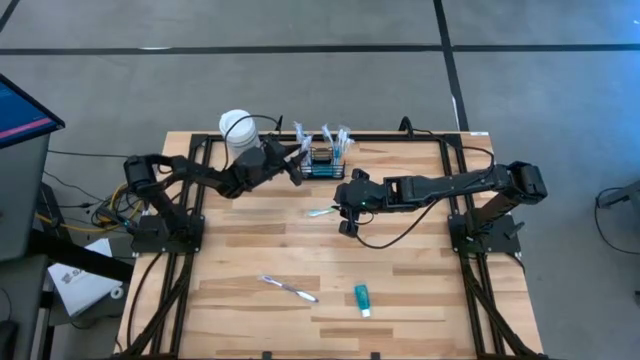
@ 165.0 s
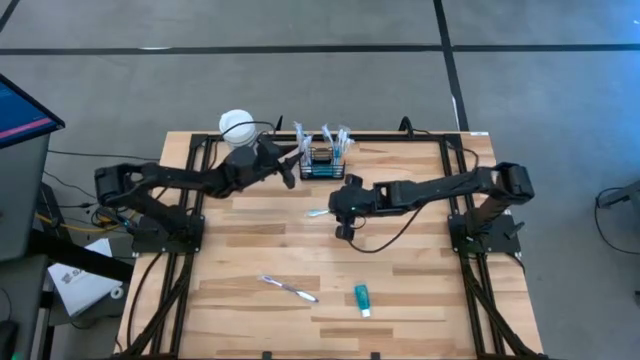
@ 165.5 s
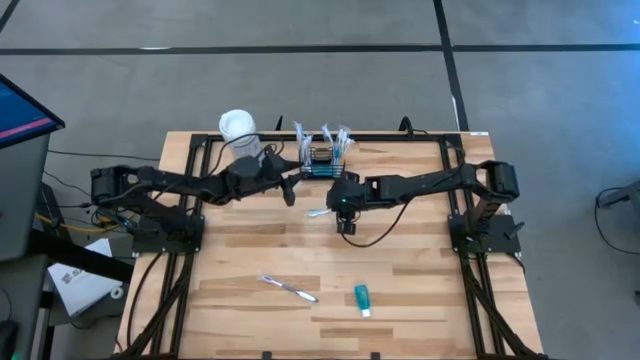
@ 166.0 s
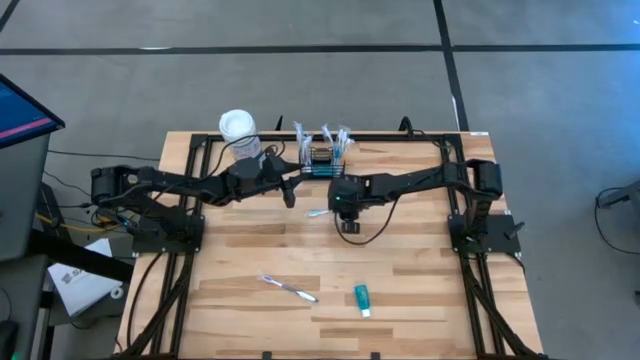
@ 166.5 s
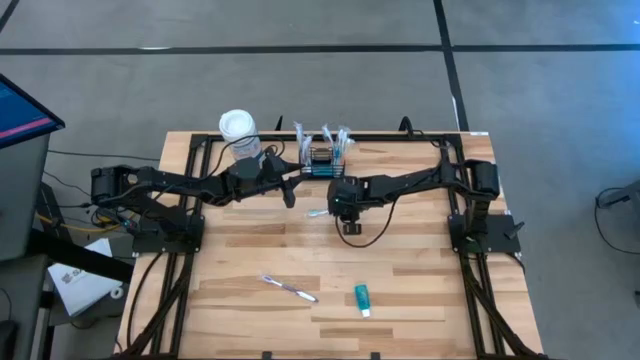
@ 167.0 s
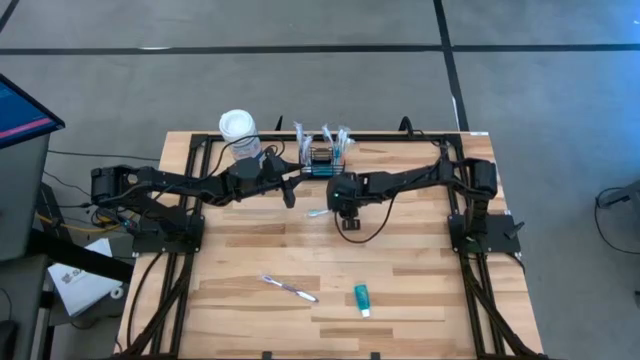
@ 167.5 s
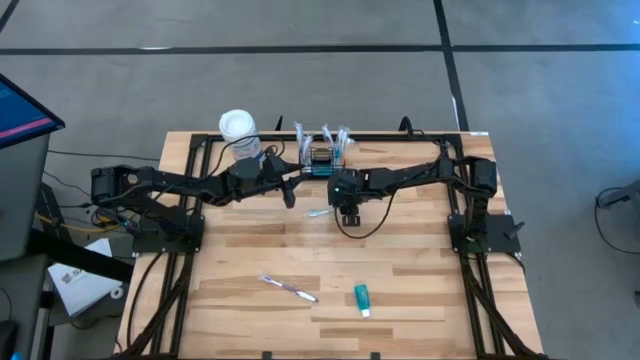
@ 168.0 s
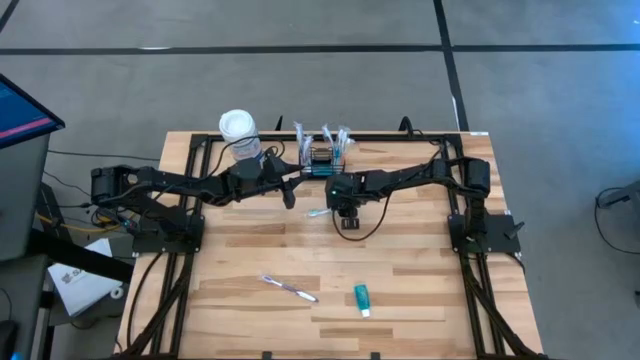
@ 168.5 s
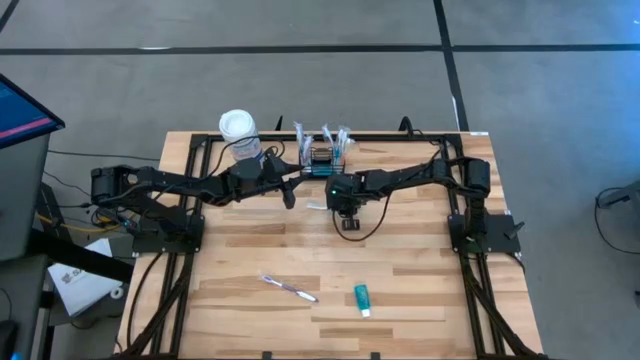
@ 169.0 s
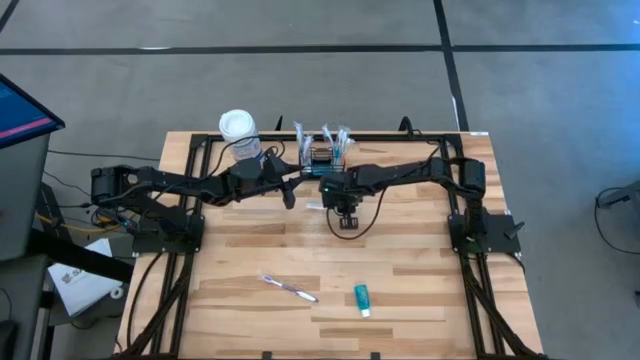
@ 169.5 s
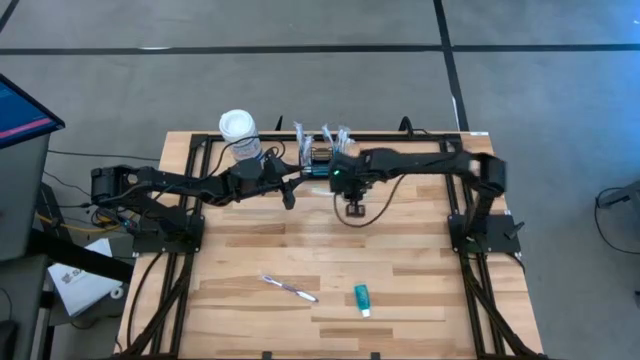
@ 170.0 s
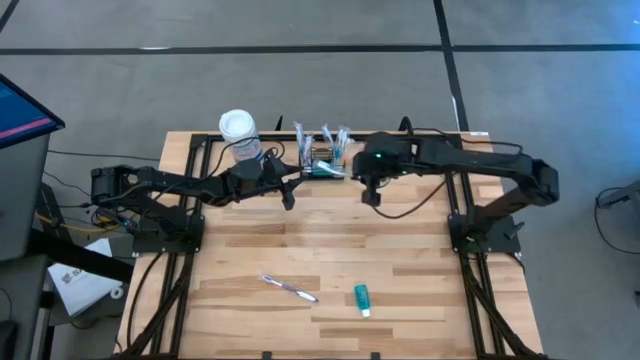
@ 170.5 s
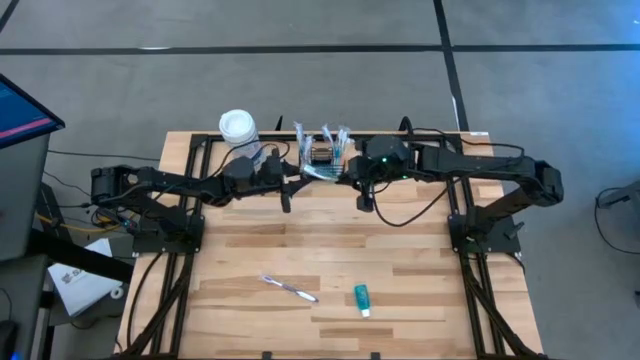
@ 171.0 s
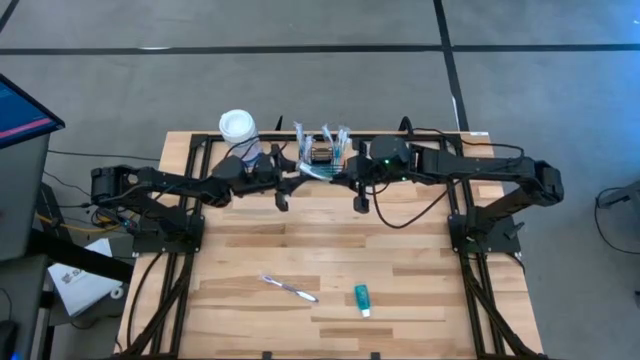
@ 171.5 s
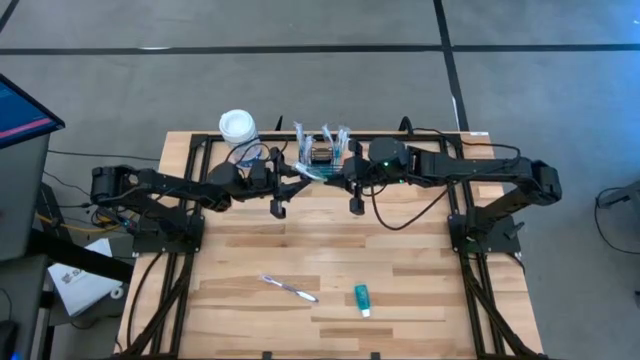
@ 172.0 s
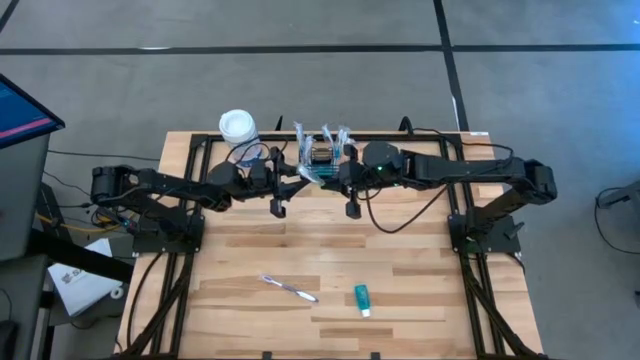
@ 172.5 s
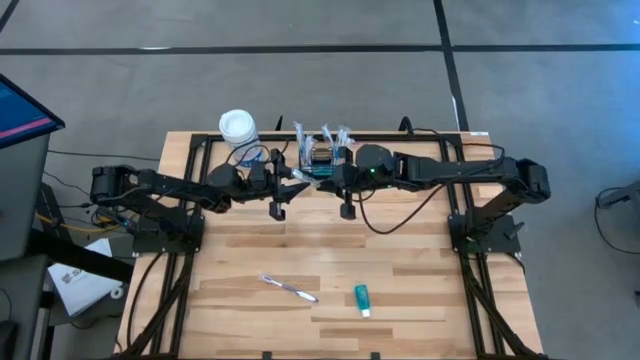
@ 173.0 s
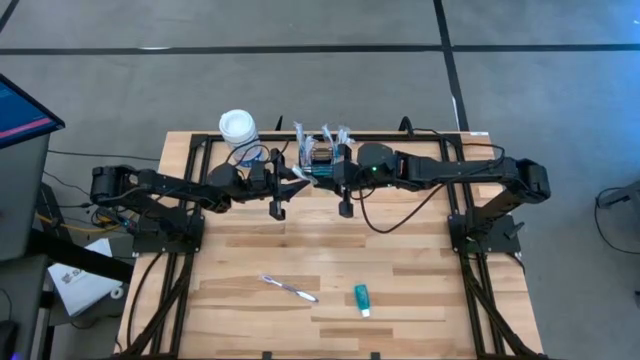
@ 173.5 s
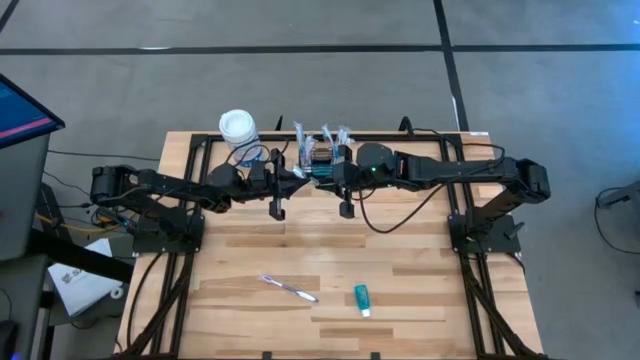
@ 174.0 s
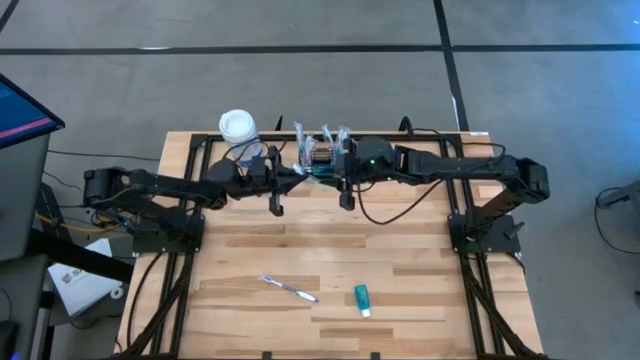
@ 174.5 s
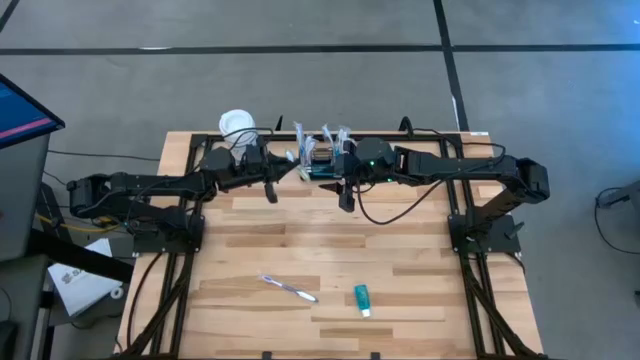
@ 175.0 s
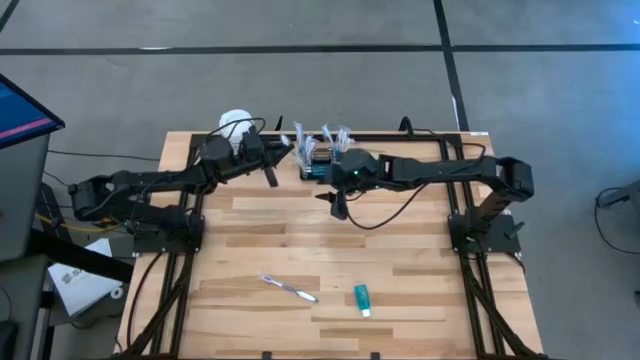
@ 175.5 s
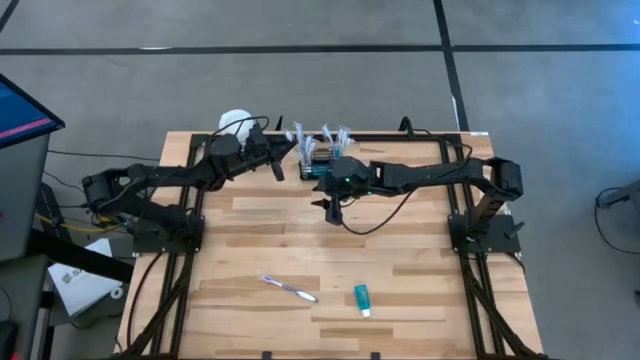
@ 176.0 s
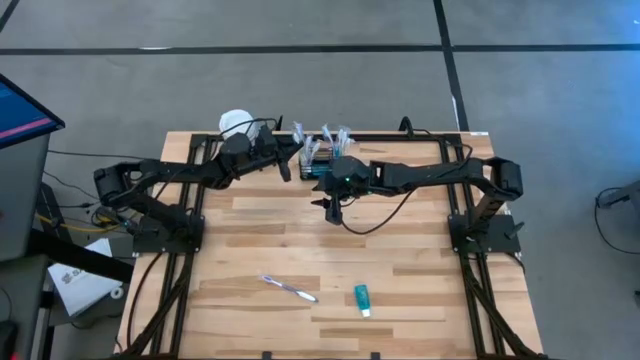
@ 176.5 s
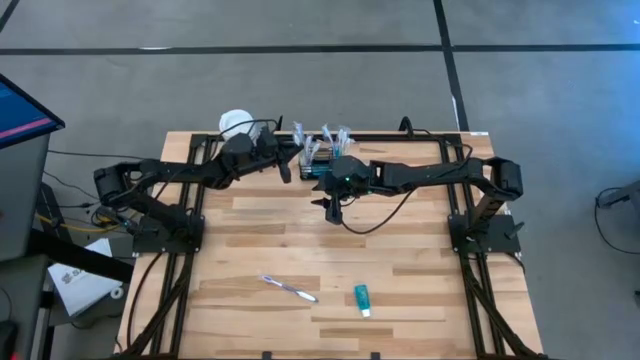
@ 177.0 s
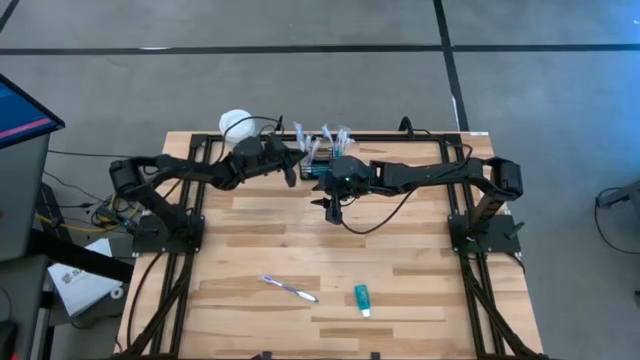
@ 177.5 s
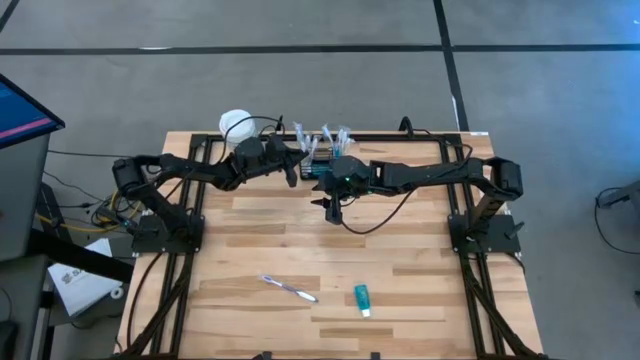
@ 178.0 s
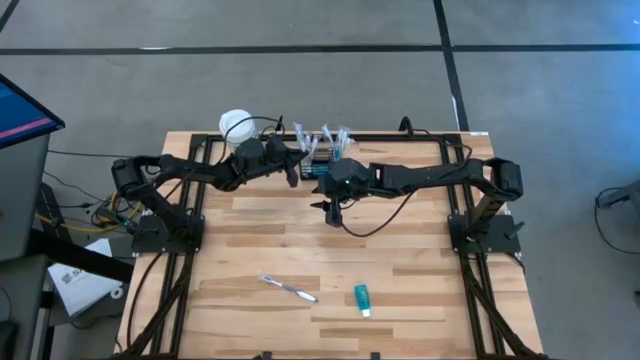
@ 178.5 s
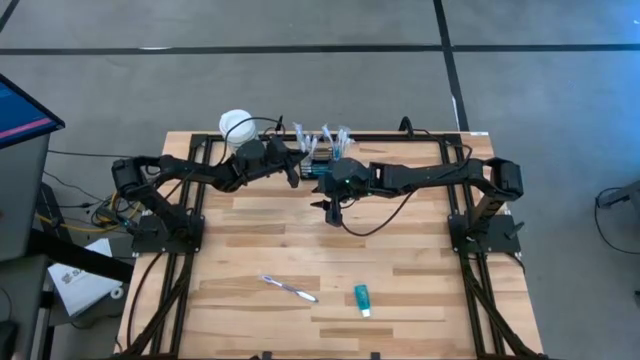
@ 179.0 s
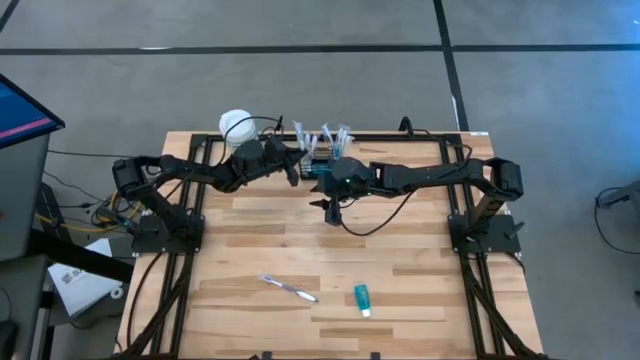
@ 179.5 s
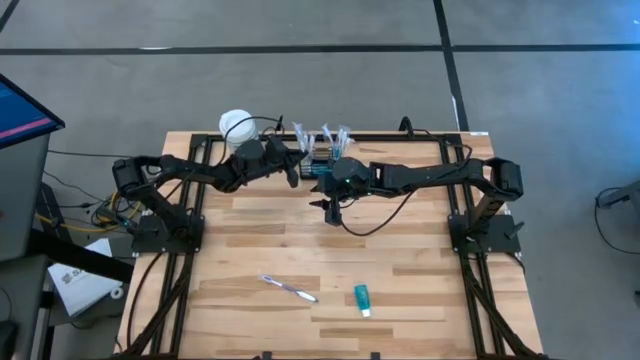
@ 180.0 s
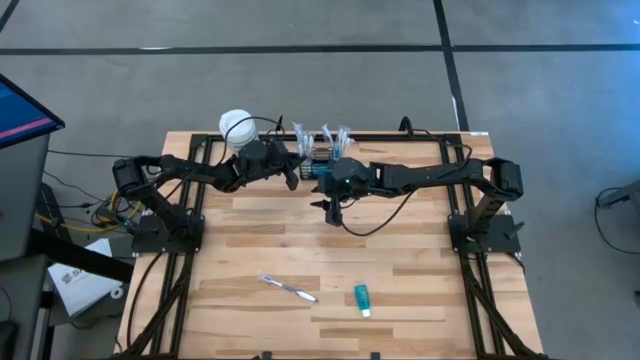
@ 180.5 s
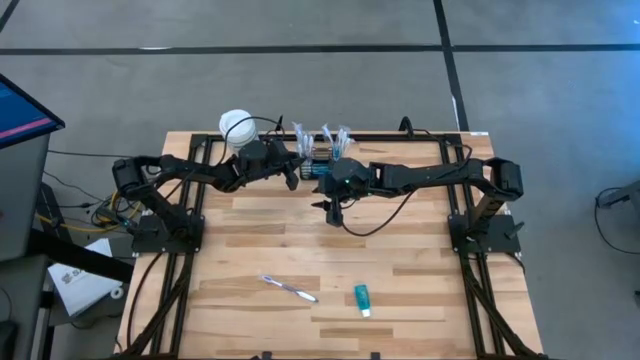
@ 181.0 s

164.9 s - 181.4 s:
Task: Pick & Place toothbrushing station
Put the green toothbrush into the black wire organizer

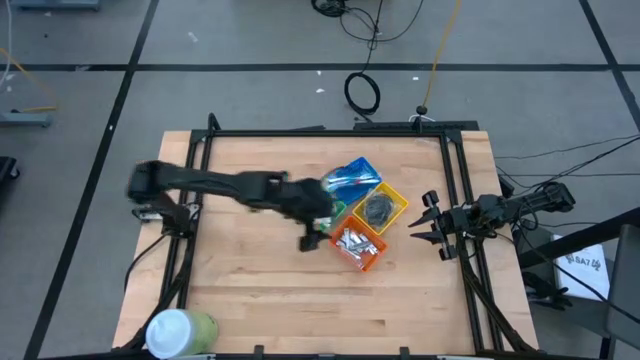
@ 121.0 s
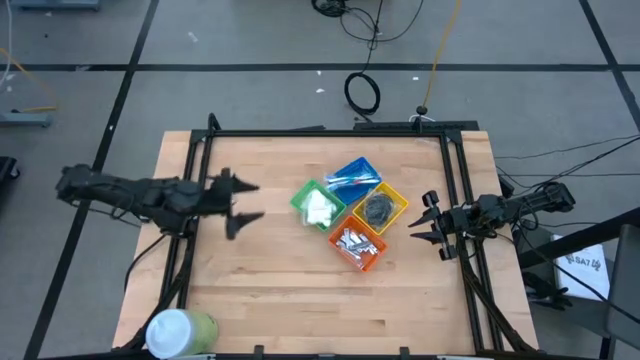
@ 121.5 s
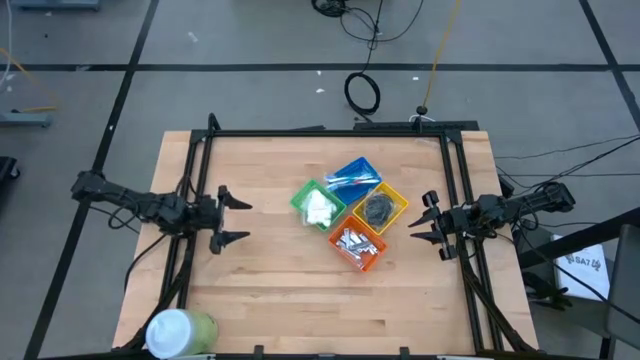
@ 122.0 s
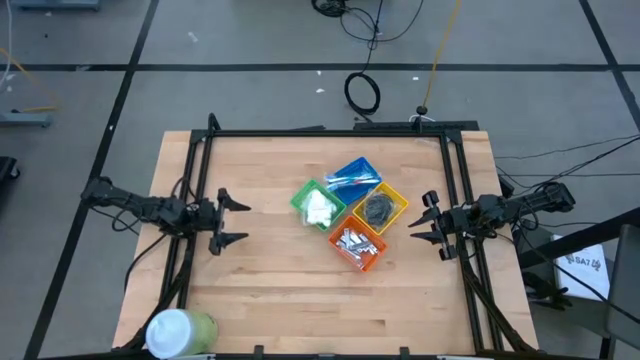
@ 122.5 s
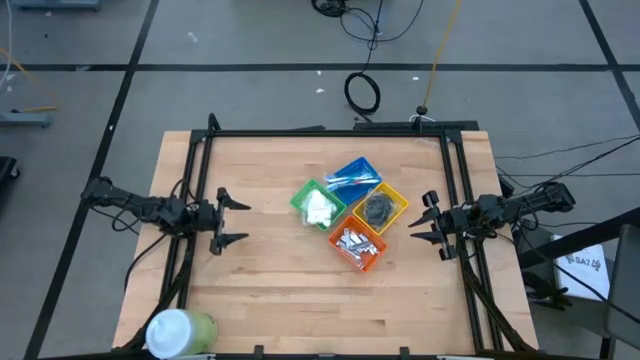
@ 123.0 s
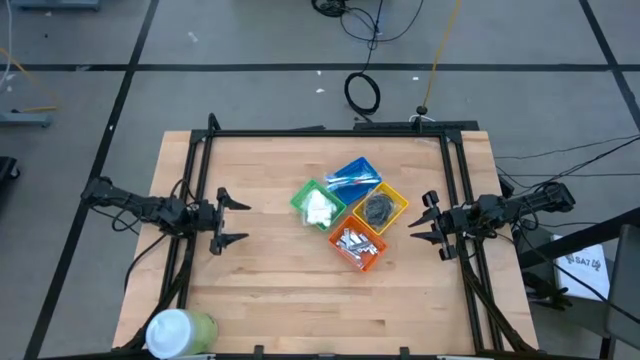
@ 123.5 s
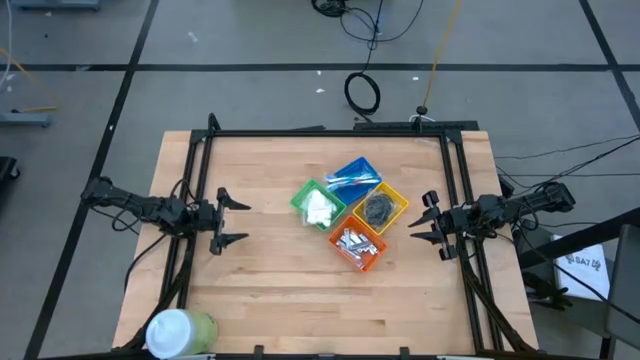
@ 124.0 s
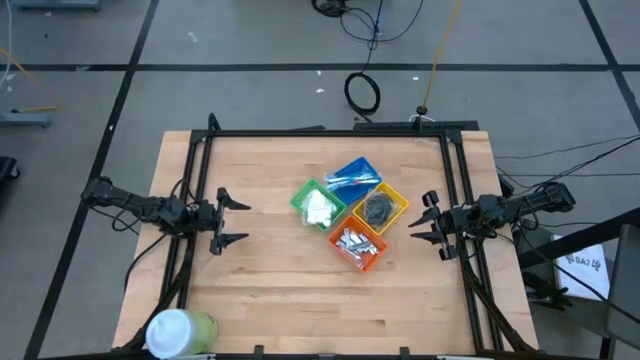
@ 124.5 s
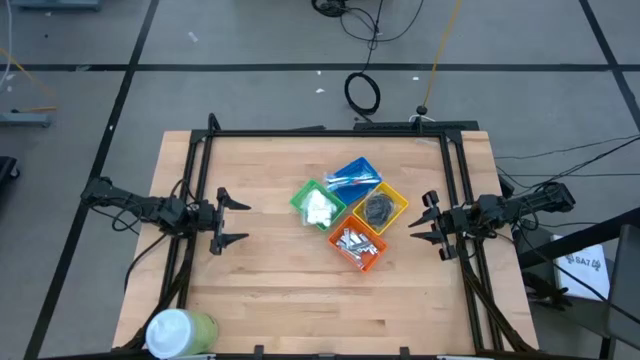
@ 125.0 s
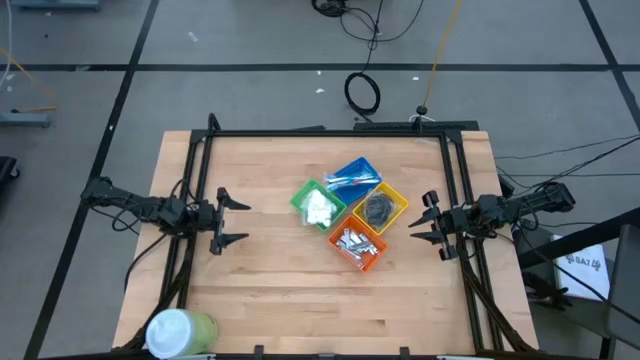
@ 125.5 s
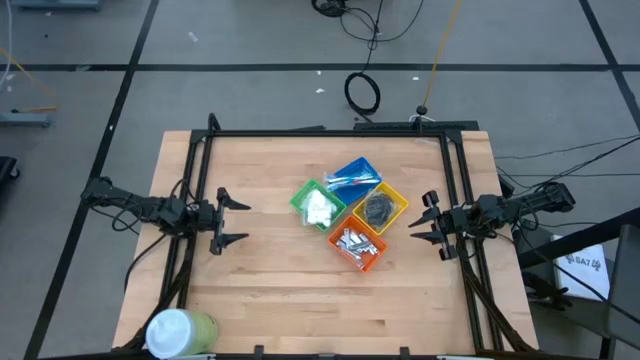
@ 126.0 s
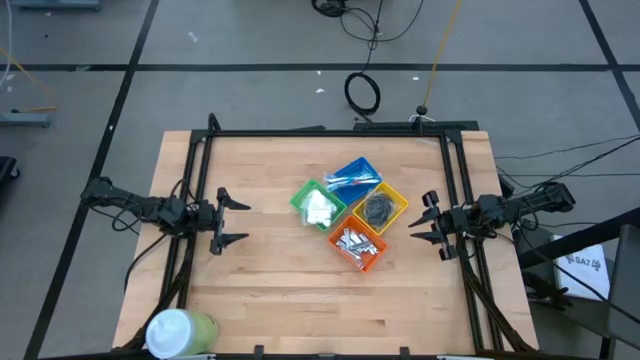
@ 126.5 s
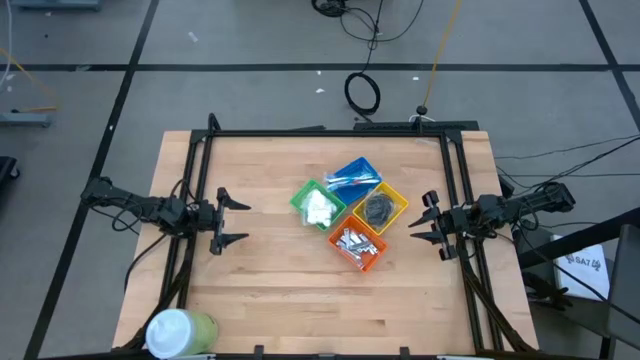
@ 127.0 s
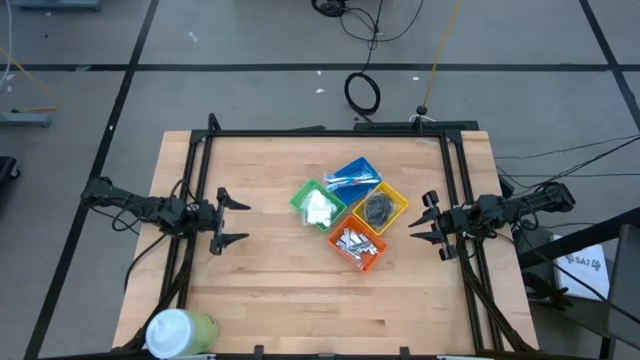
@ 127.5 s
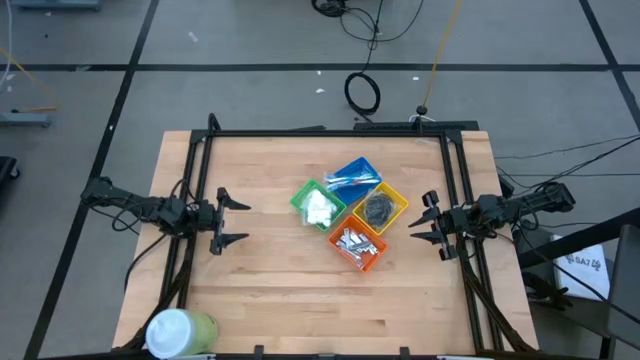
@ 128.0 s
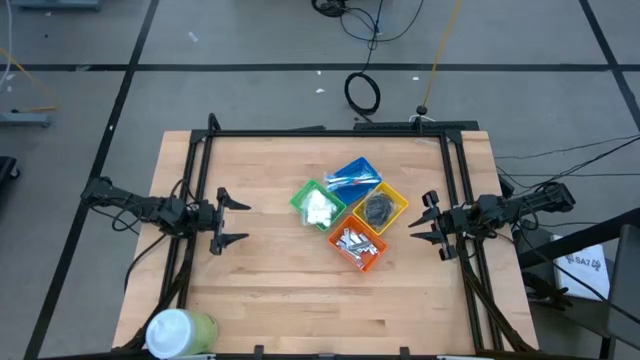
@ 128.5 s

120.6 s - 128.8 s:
Task: Pick & Place Travel size toiletries
Return to Home Position
